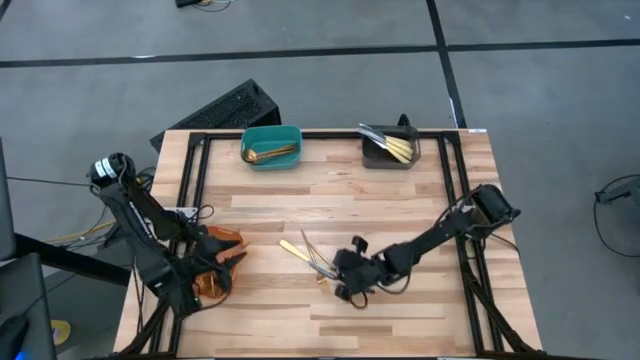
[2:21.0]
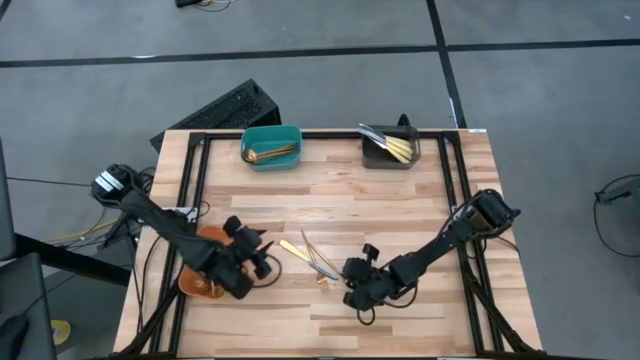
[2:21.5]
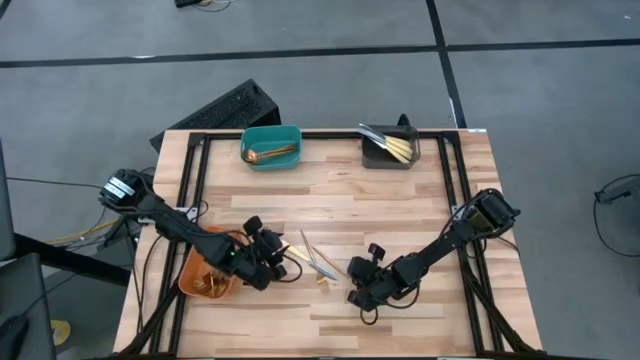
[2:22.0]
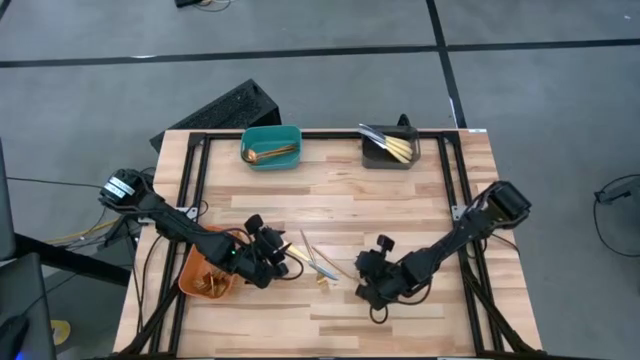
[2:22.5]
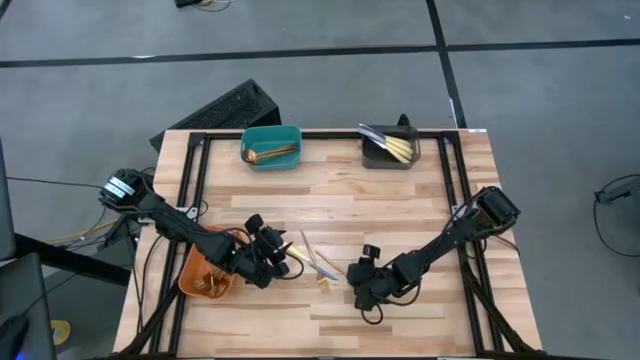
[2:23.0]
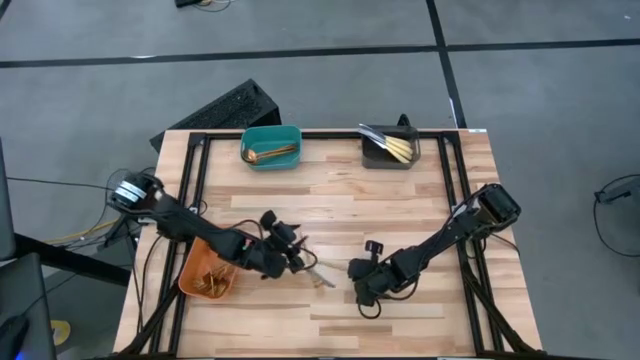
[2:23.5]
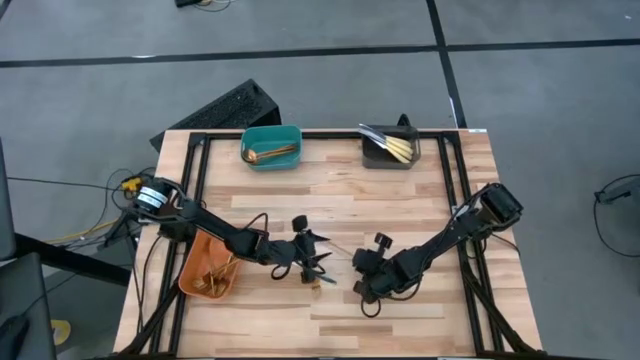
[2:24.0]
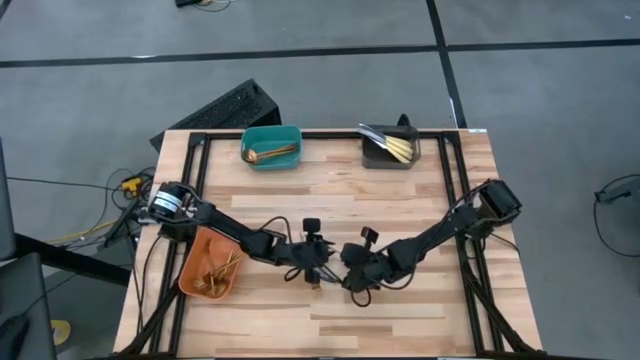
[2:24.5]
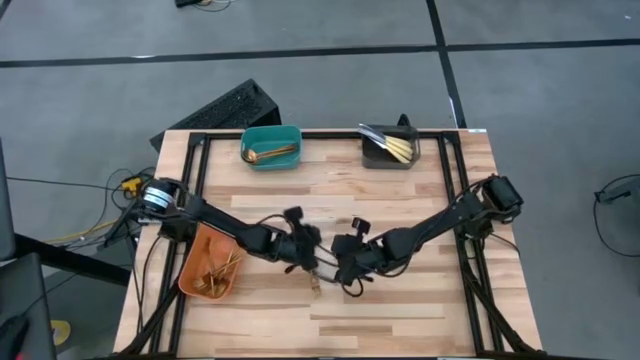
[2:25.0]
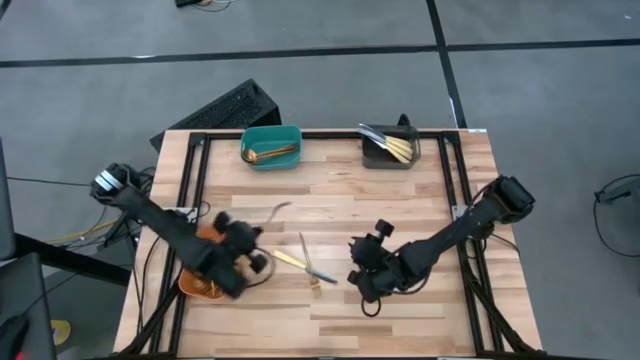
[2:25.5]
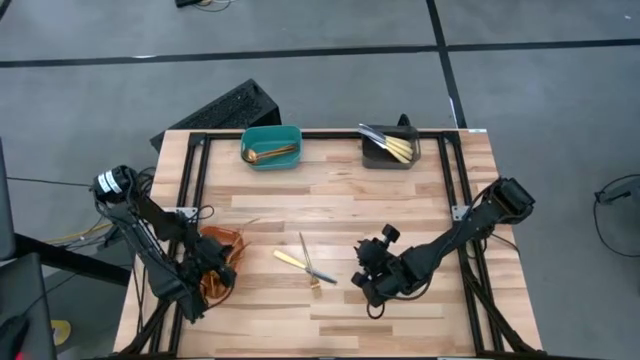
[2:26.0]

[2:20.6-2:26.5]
Task: Sort silverware by color (type)
Put the gold fork into the orange bin

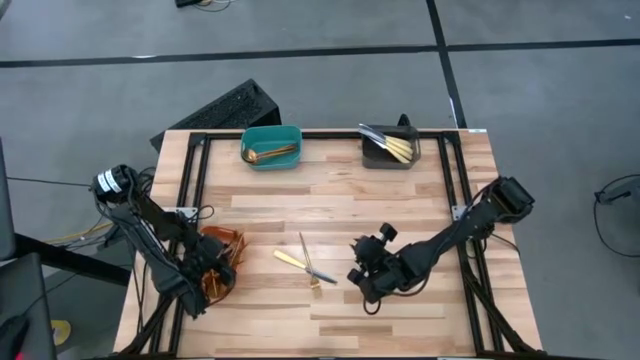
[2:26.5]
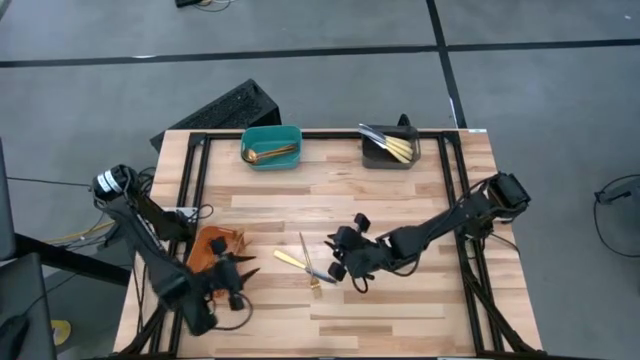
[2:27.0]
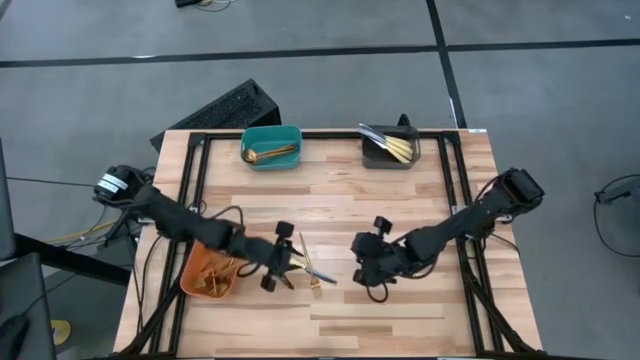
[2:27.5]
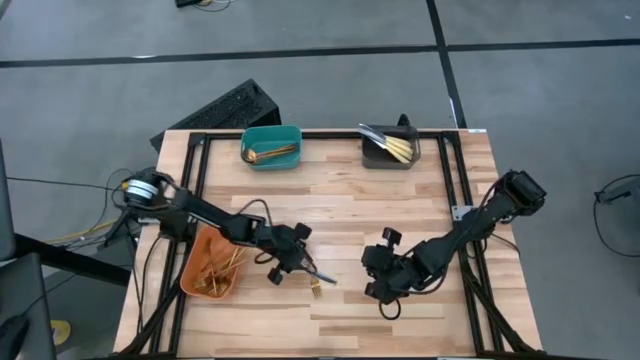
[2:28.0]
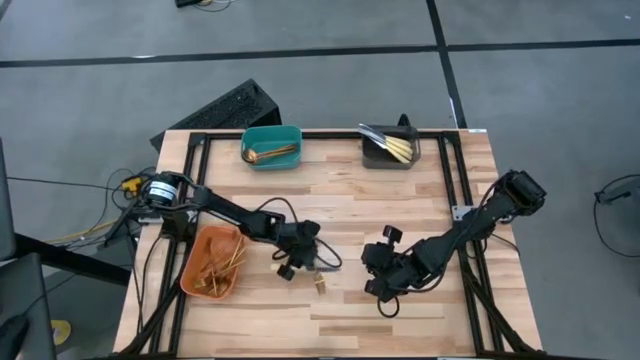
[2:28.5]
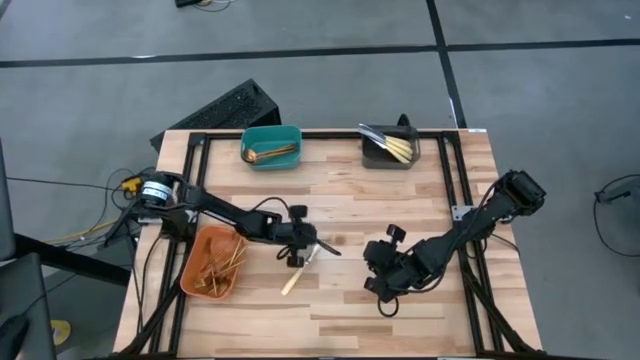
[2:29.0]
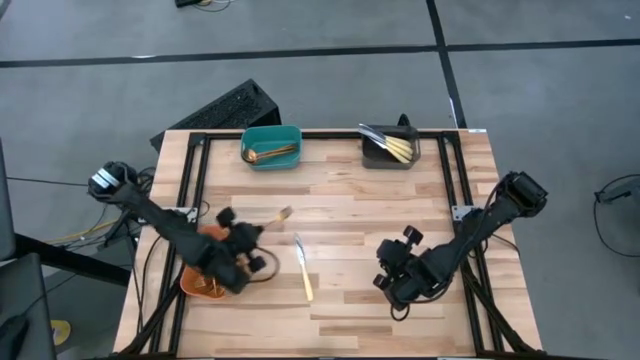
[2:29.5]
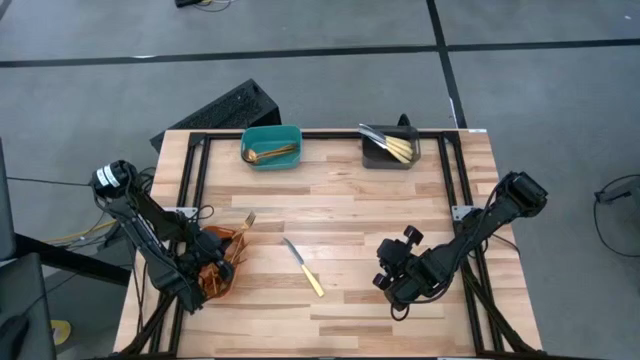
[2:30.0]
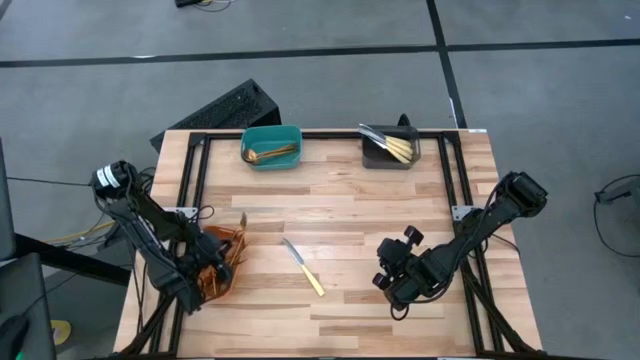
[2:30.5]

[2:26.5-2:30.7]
Put the gold fork into the orange bin

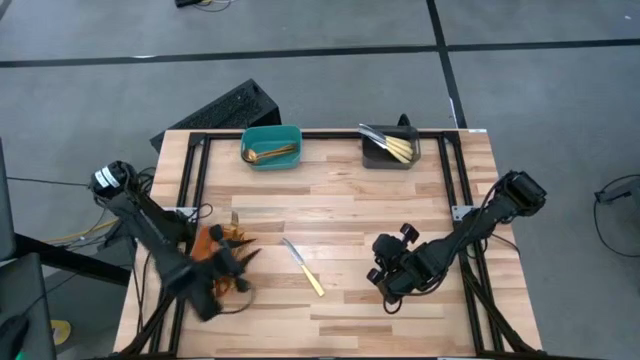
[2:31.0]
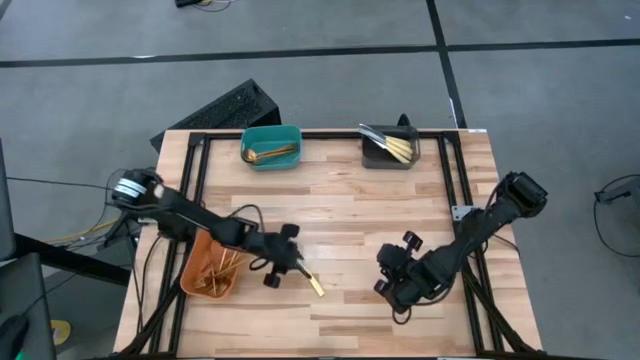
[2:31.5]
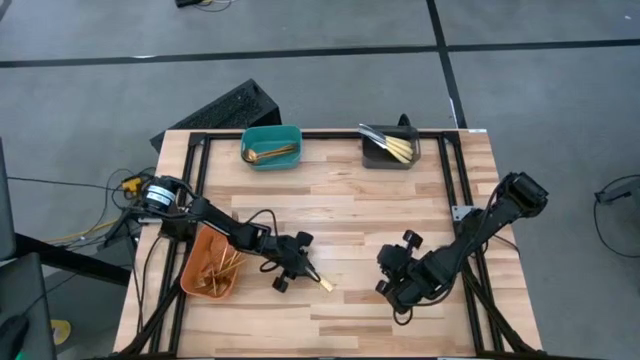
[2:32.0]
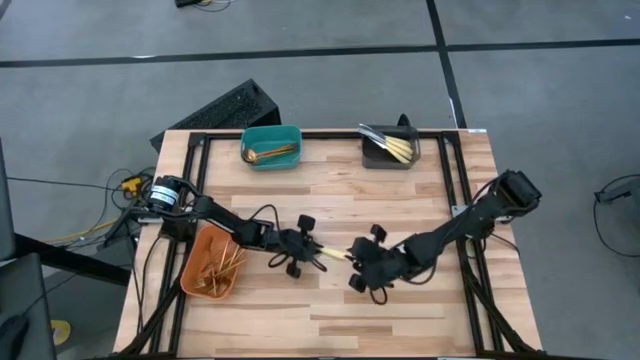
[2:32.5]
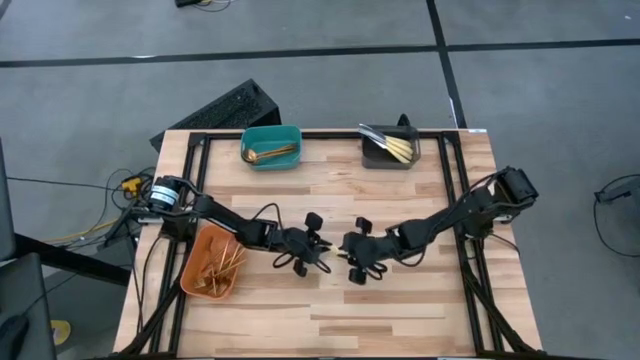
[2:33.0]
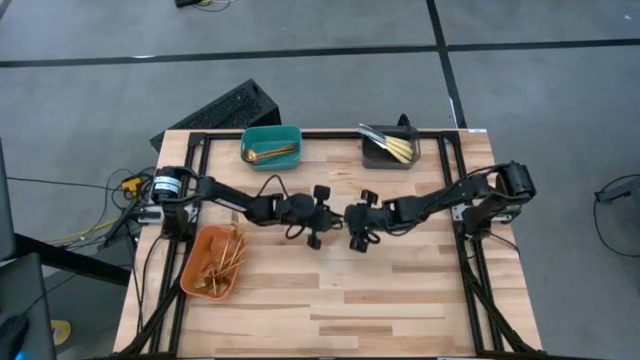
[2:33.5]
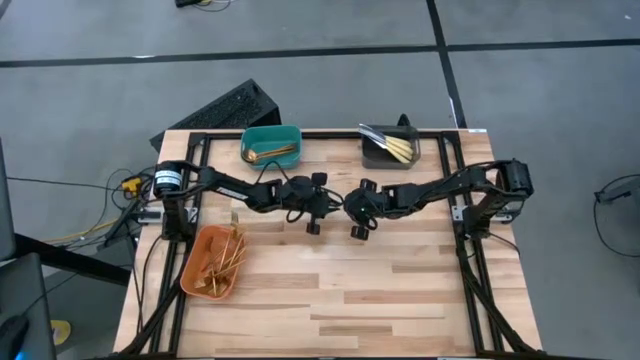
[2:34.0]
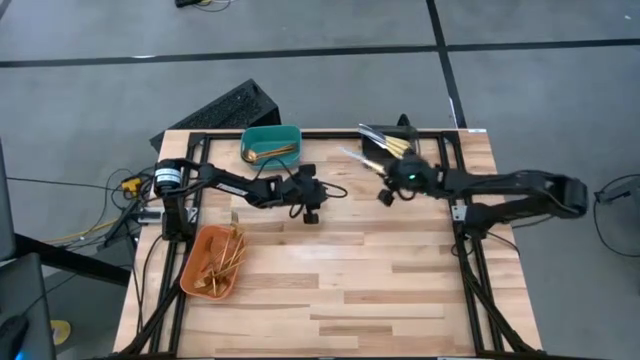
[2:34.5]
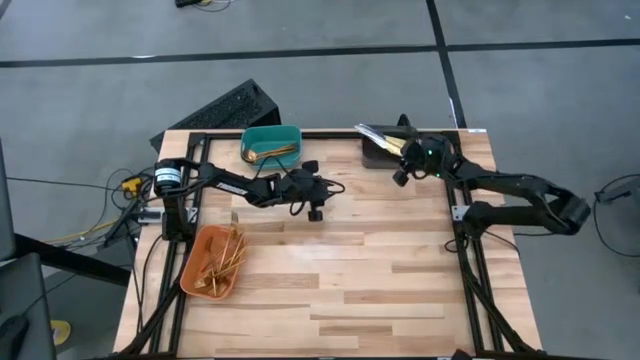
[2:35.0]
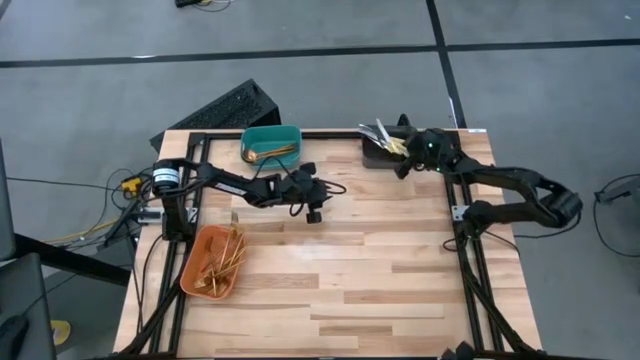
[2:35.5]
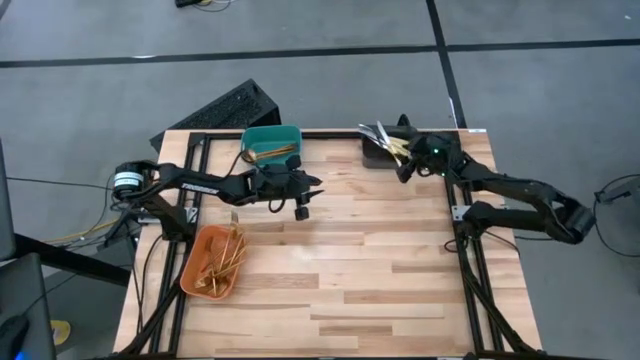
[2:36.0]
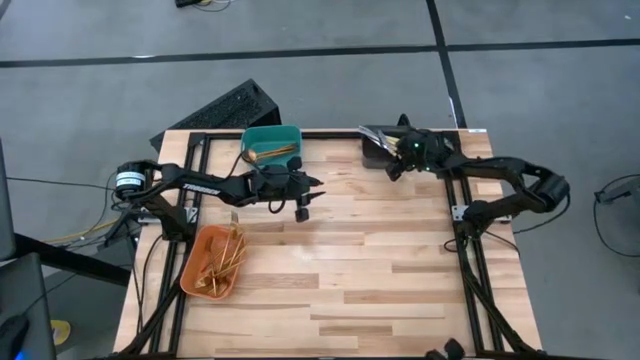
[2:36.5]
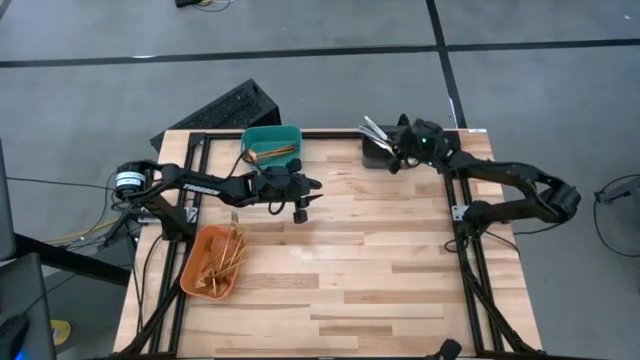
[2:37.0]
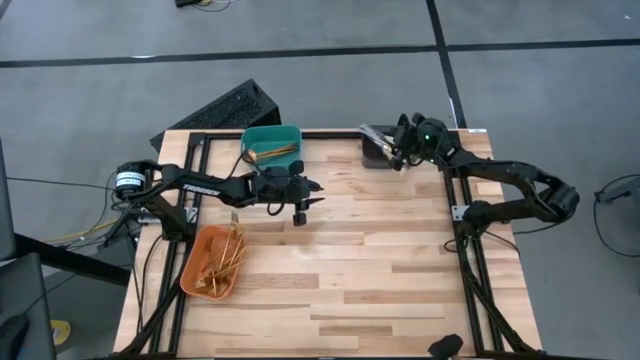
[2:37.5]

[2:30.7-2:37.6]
Put the yellow knife into the black bin

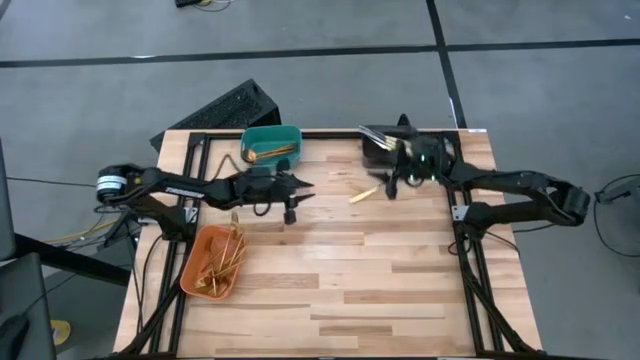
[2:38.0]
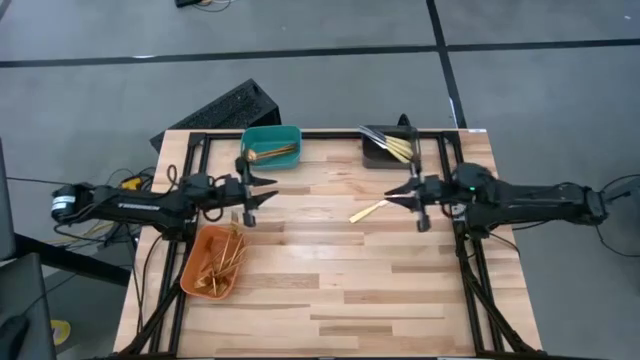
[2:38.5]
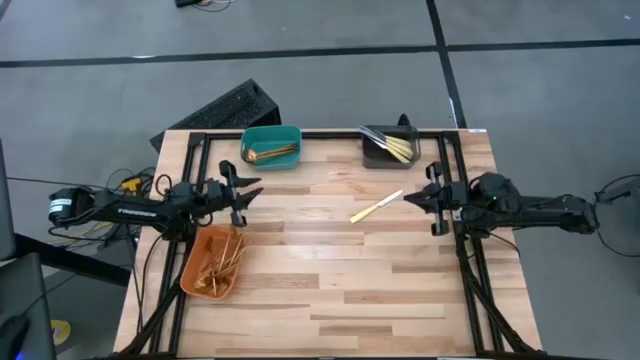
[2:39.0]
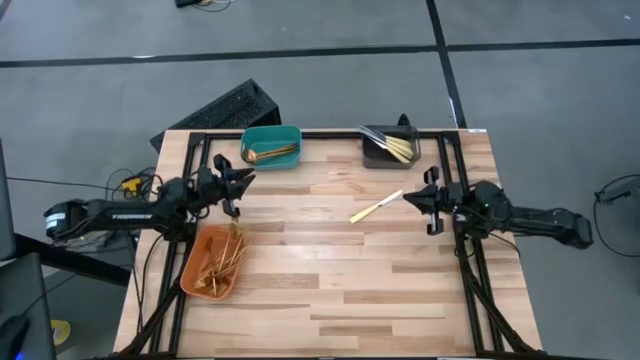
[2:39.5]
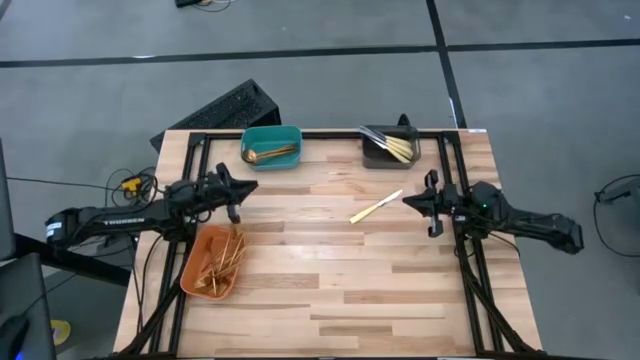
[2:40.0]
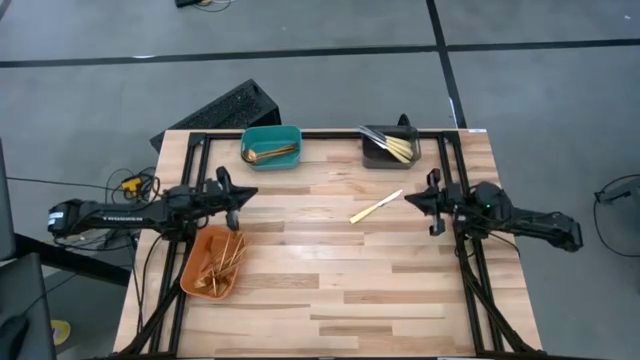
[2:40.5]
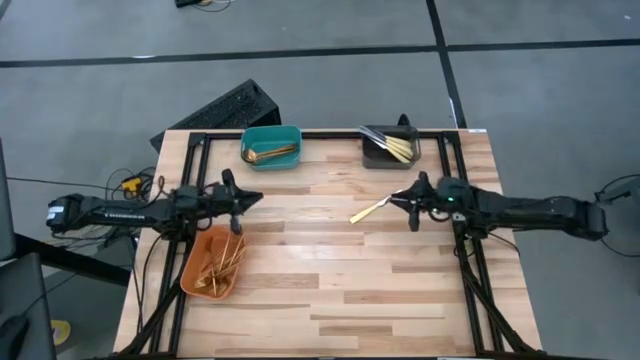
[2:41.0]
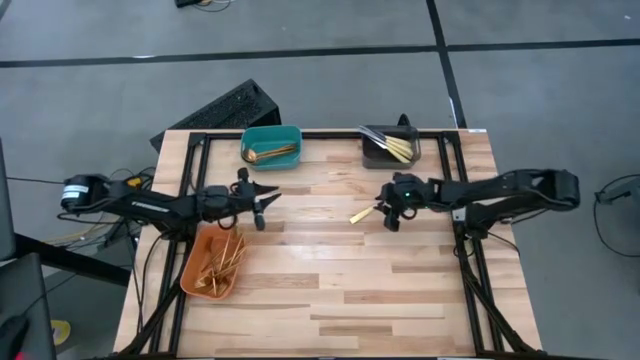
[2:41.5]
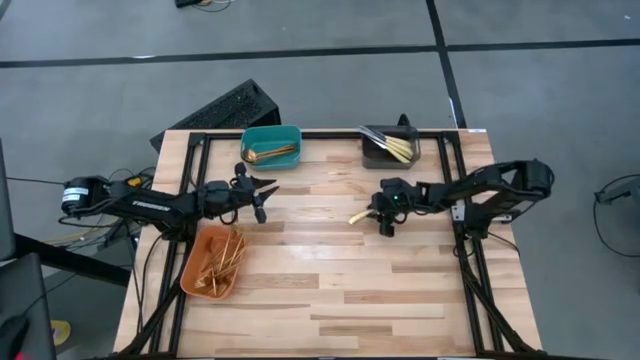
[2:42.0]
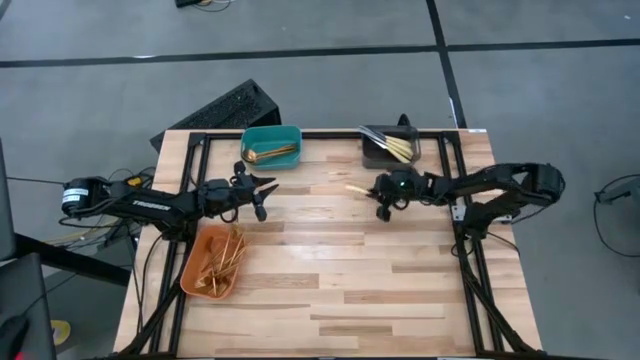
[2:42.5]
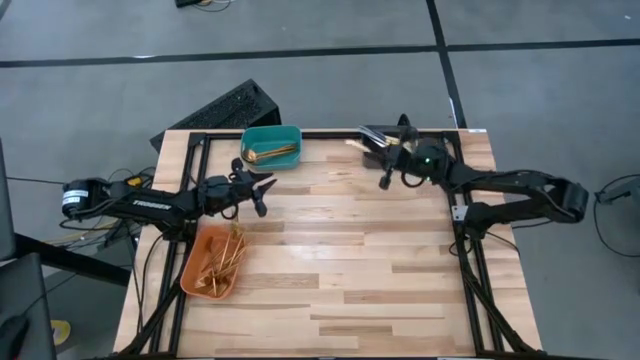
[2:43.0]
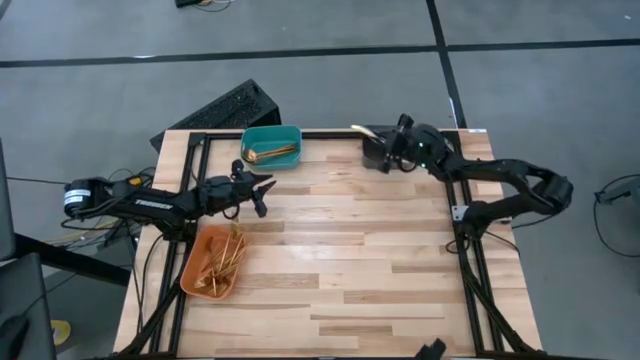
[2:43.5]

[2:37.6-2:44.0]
Put the yellow knife into the black bin
